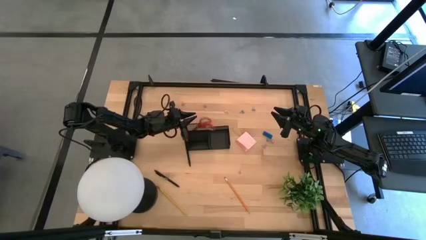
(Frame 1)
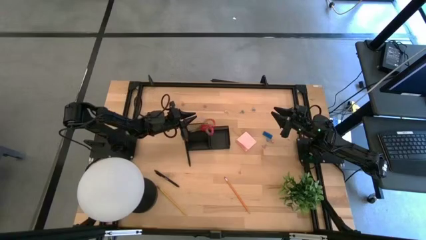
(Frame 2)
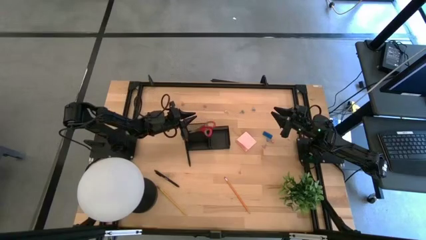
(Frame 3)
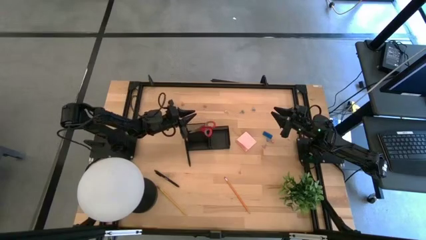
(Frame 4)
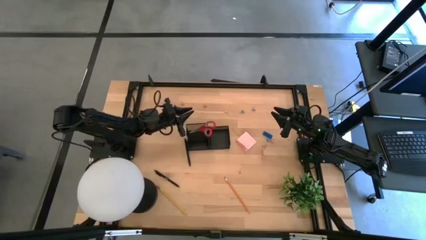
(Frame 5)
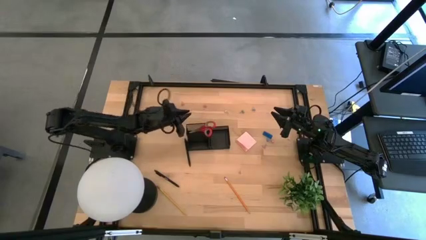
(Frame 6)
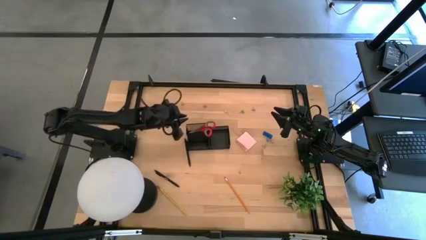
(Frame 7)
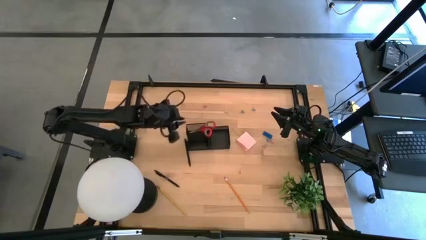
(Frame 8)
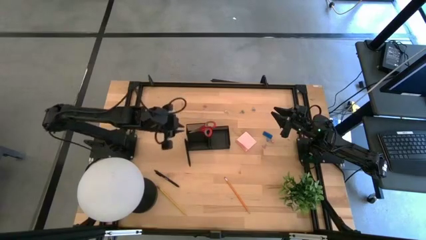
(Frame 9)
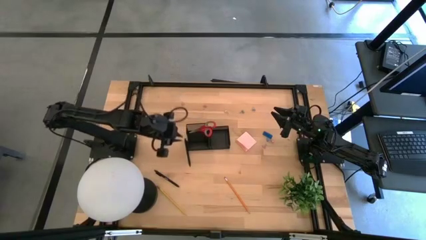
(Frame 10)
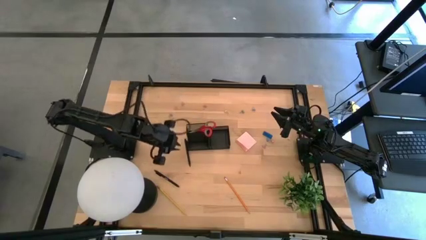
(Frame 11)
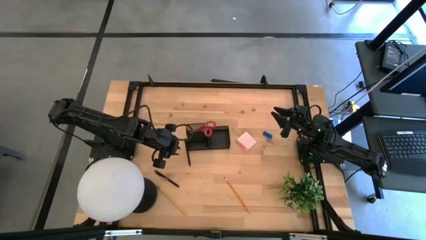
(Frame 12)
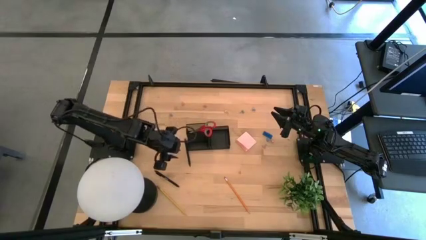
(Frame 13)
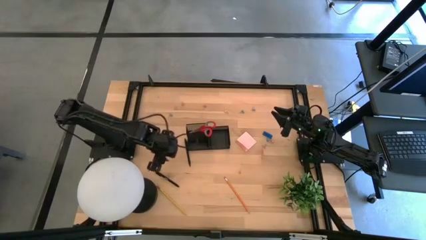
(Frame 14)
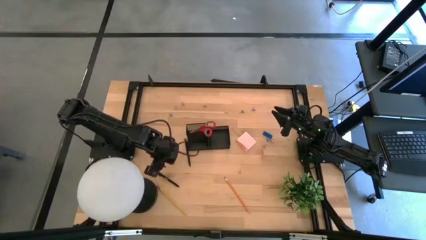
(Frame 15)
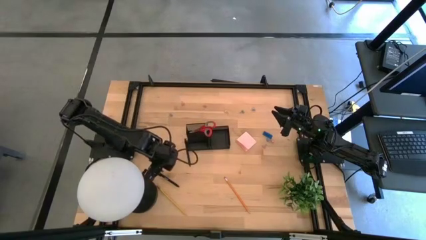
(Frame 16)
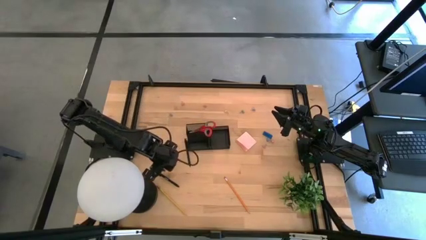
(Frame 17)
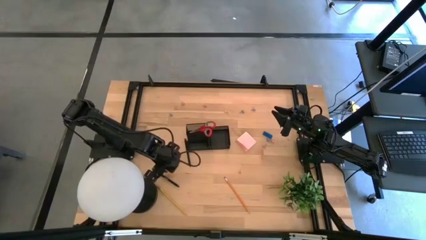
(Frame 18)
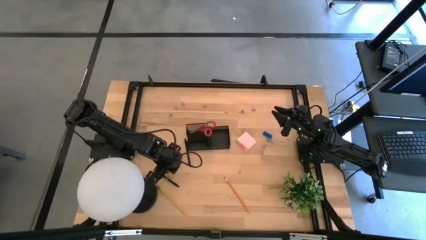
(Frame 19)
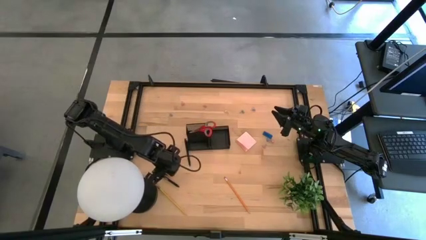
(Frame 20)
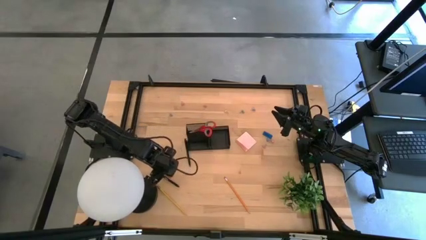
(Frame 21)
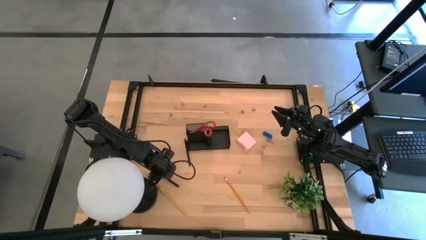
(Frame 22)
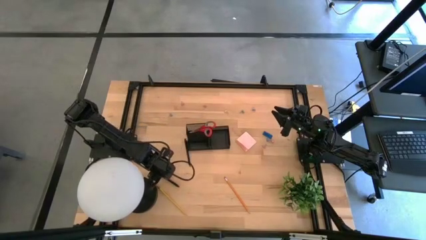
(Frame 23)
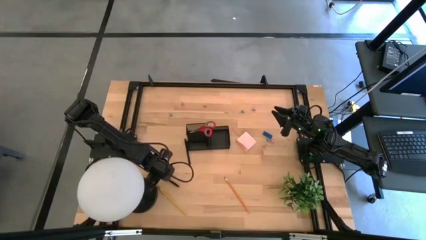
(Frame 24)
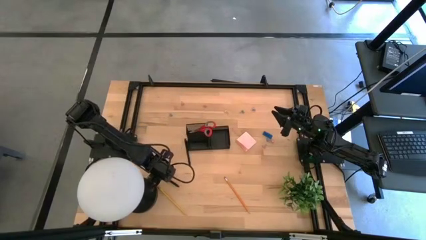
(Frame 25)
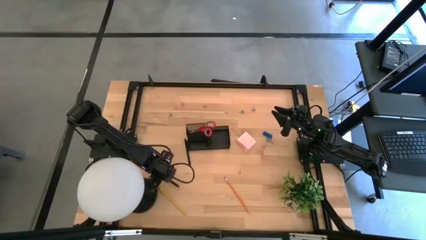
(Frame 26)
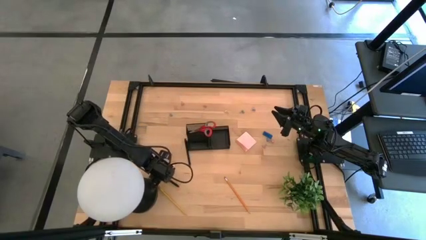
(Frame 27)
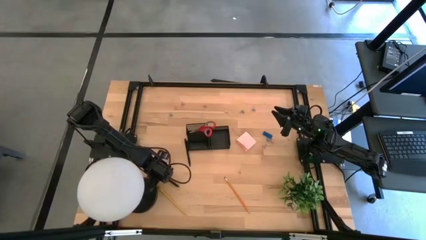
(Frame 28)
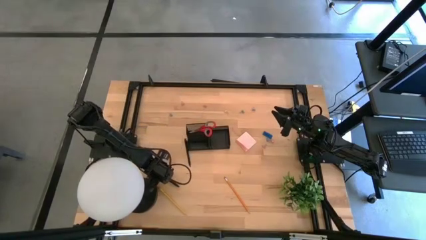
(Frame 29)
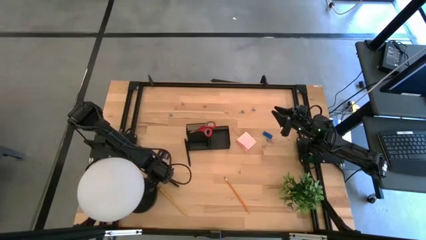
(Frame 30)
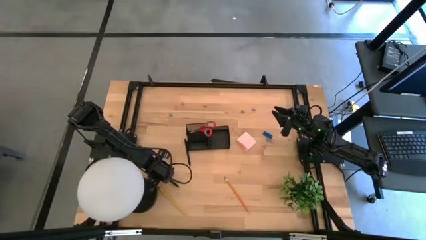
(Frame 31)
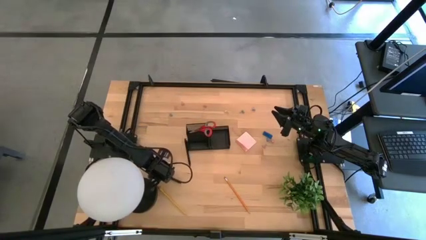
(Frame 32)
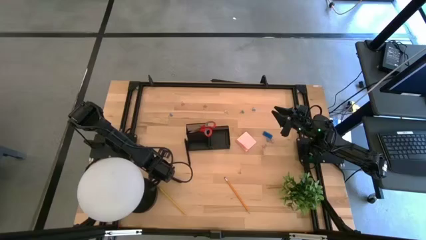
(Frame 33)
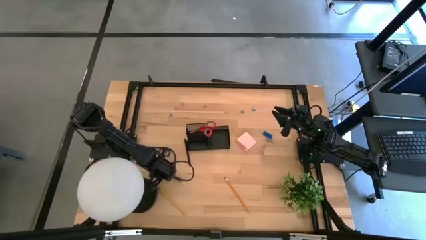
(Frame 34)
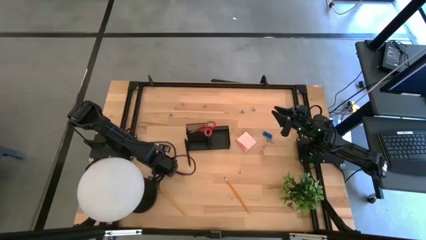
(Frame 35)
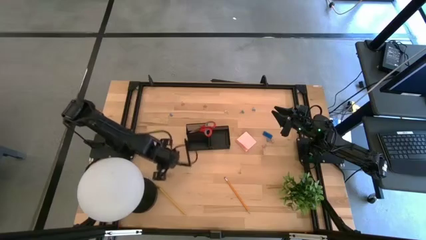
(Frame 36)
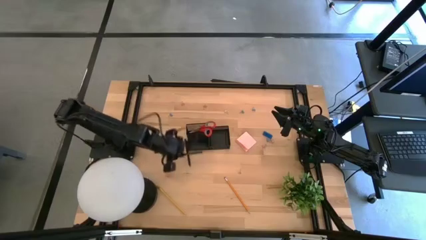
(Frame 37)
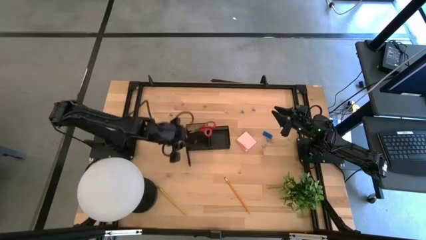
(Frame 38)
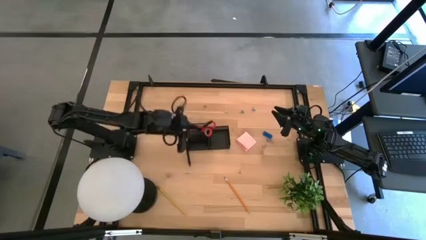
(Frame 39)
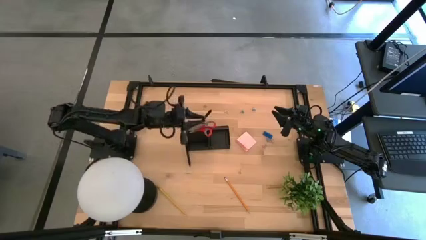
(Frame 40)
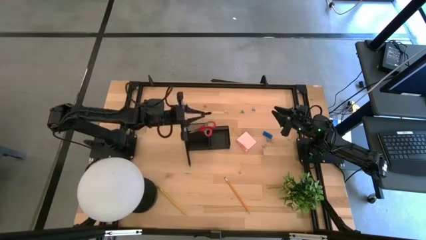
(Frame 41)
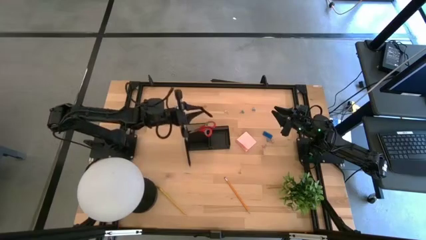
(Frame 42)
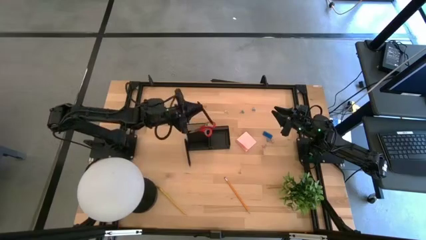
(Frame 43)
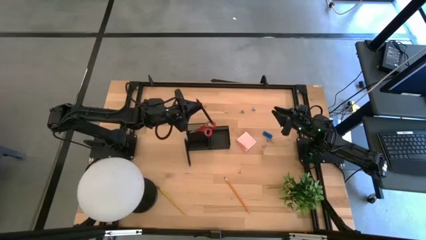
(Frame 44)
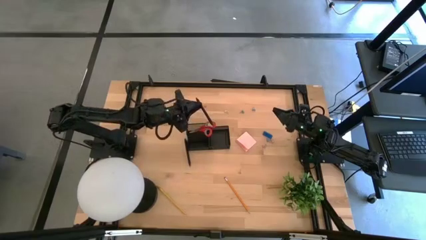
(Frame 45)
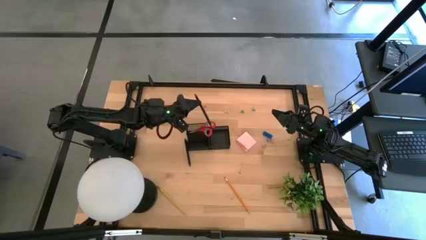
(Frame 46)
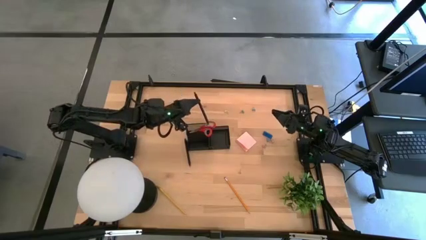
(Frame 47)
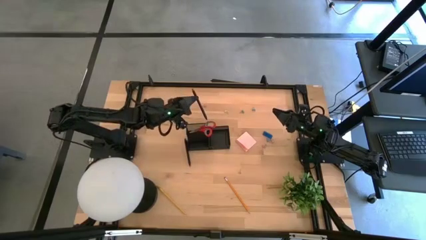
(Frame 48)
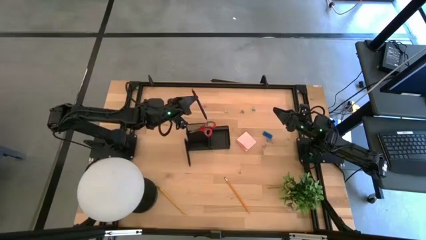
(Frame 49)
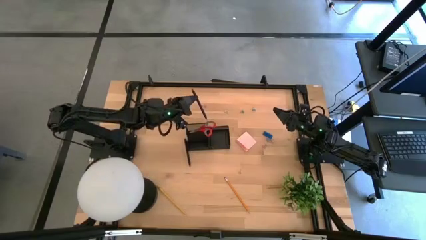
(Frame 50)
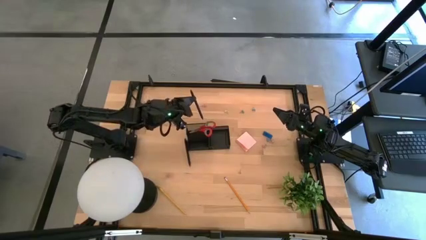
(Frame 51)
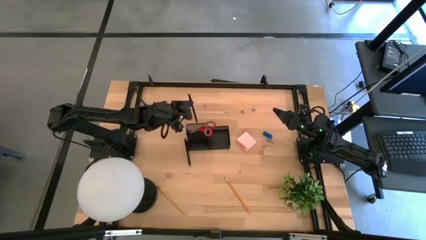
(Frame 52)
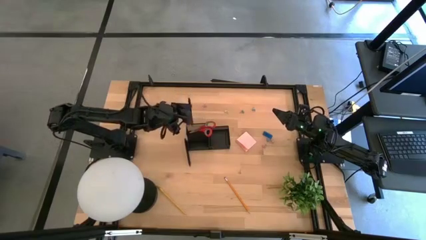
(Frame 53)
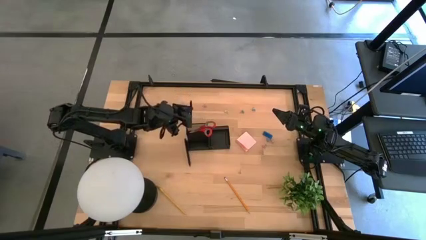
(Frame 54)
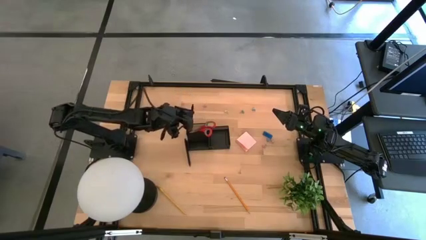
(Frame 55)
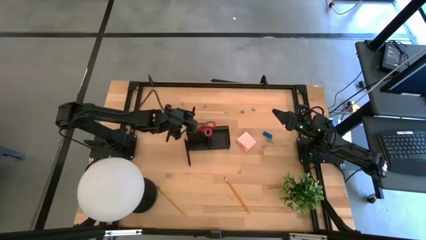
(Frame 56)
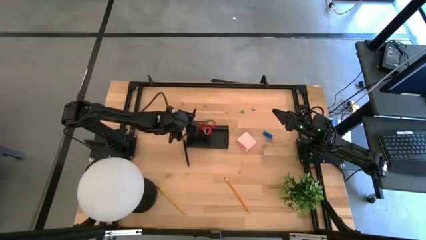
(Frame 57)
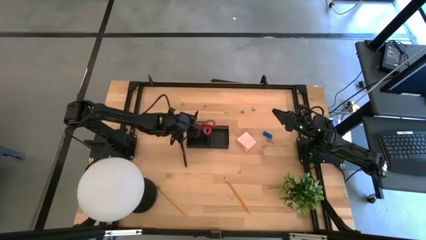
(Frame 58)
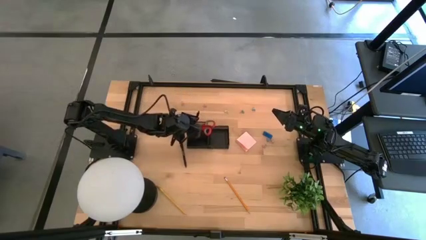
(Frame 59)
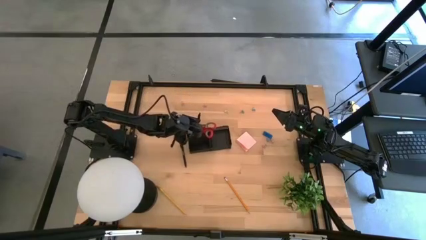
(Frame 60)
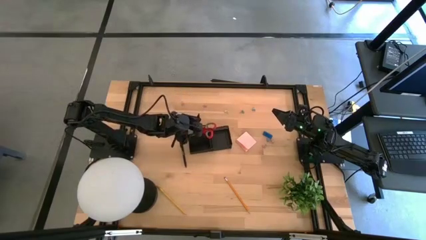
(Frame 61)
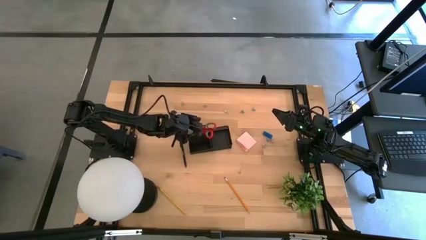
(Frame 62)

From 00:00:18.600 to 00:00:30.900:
Task: Pick and place office supplies into organizer
Put the black pen into the desk organizer

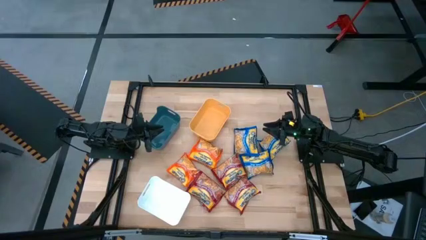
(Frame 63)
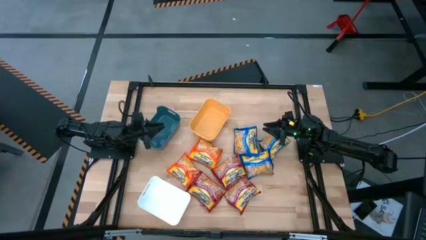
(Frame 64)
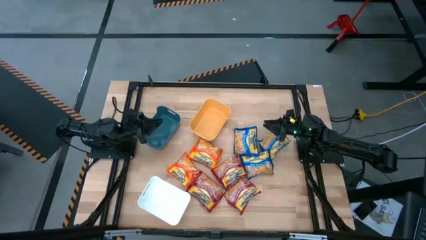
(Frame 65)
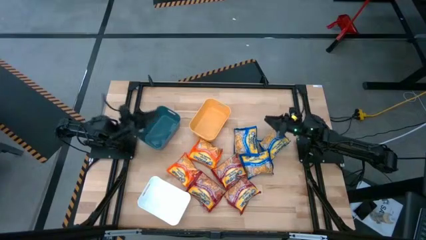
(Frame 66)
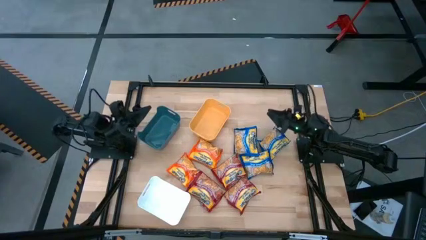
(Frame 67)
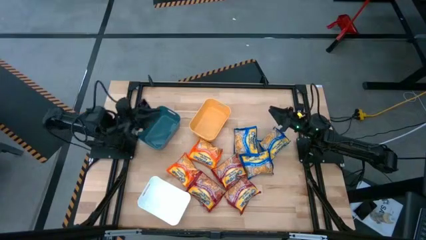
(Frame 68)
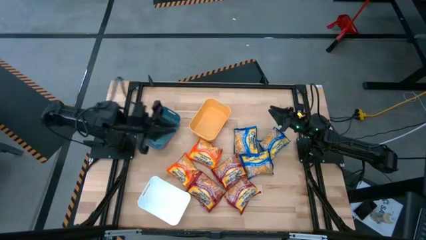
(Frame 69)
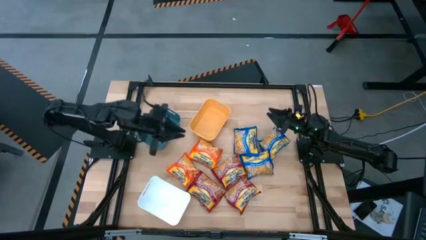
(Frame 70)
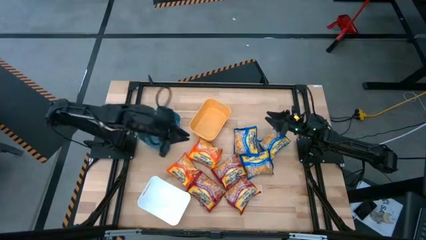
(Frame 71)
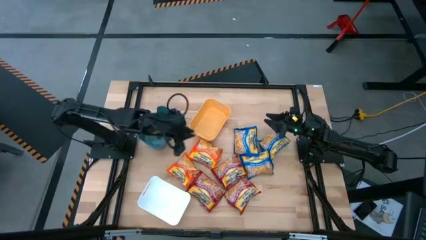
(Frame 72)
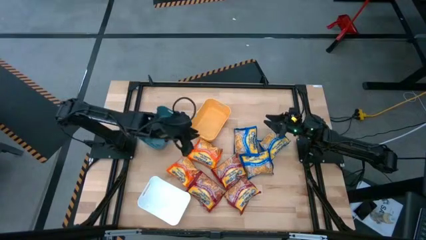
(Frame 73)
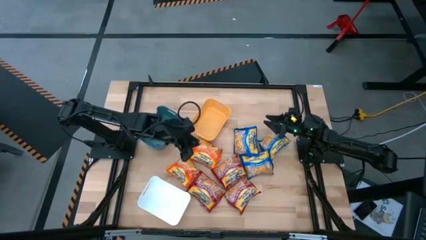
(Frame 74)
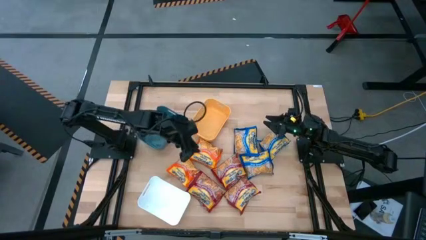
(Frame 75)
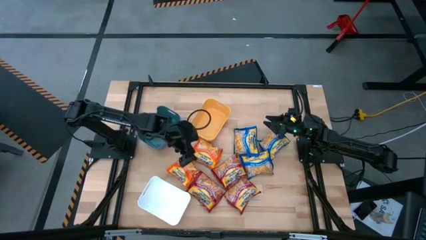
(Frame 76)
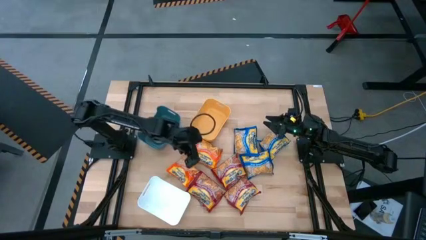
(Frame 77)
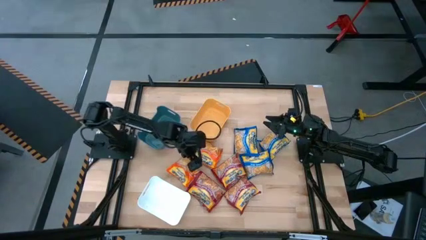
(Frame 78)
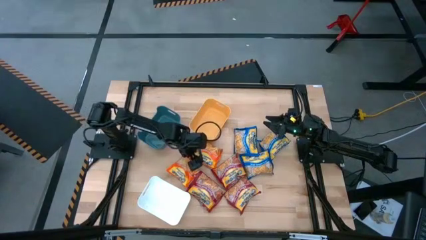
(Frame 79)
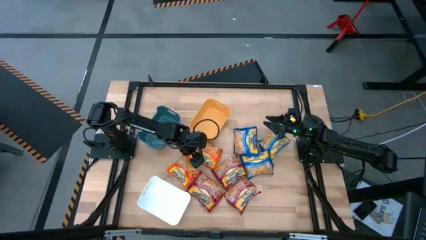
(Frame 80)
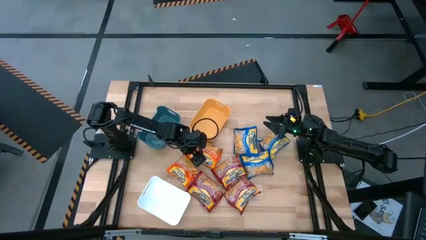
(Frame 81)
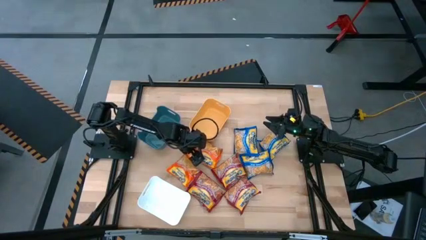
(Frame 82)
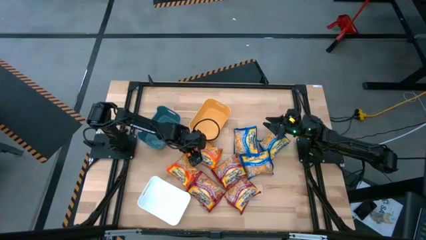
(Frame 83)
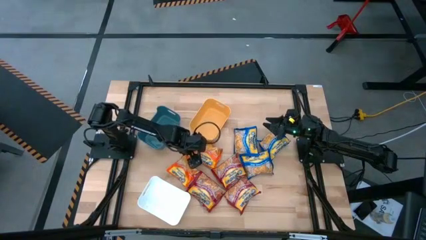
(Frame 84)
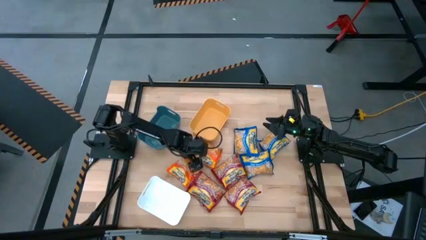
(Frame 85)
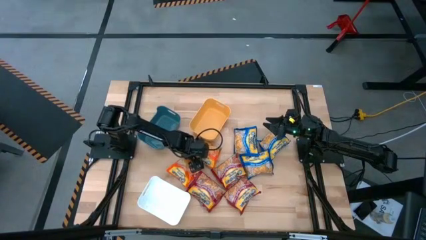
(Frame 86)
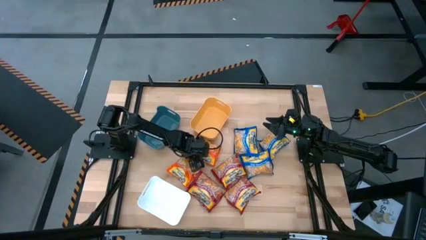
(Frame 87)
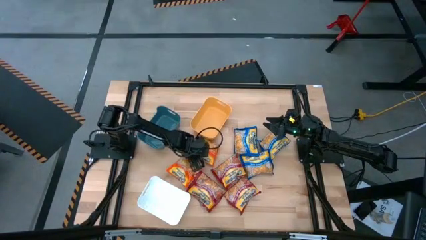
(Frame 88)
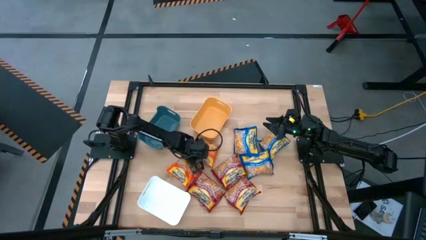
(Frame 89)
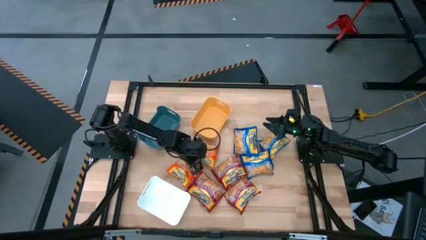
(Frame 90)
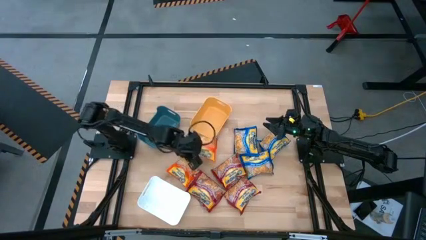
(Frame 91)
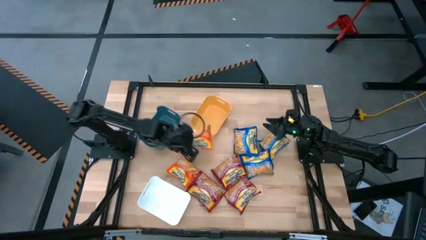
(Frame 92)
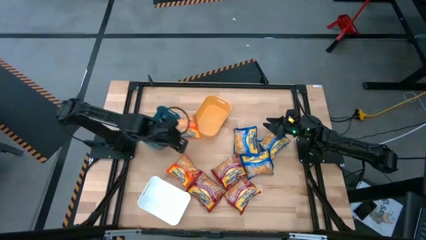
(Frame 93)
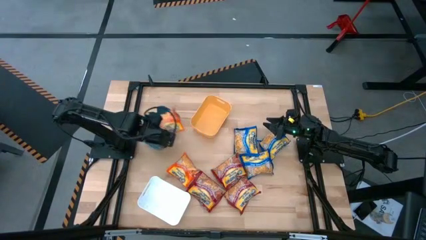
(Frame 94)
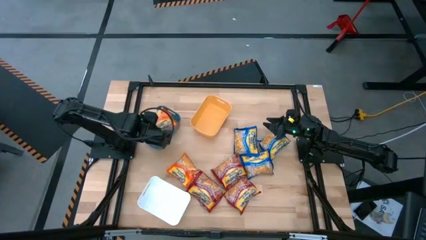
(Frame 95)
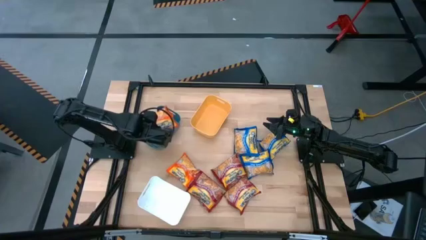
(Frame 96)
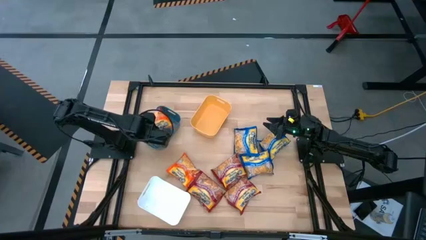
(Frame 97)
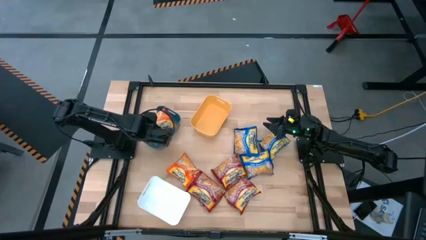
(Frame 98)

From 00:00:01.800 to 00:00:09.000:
Task: Sort Maruchan noodles
Put the top orange noodle pack into the blue bin
